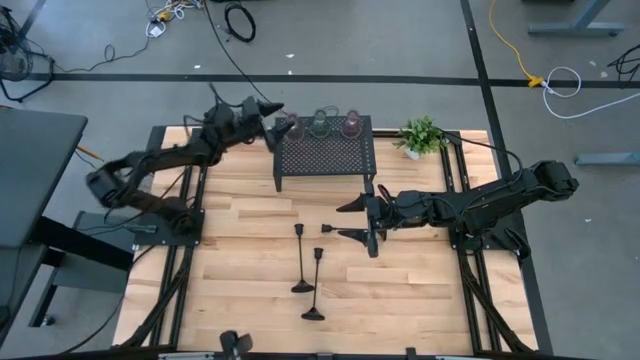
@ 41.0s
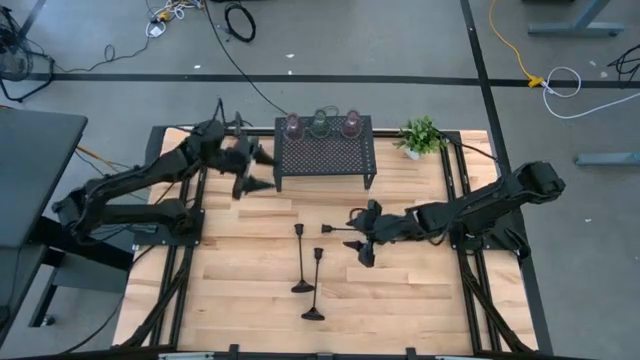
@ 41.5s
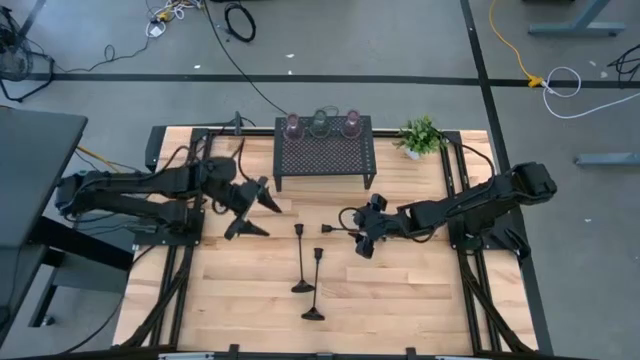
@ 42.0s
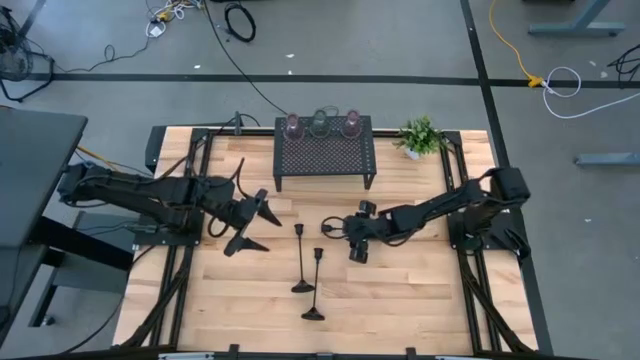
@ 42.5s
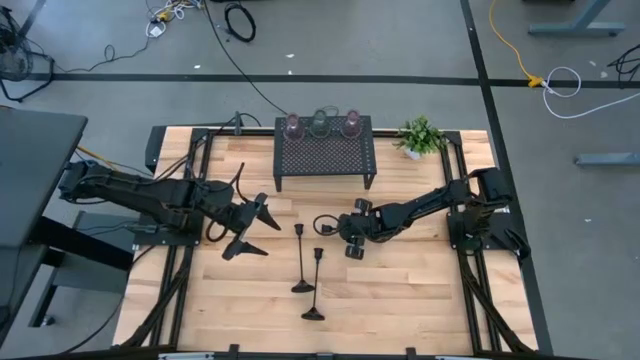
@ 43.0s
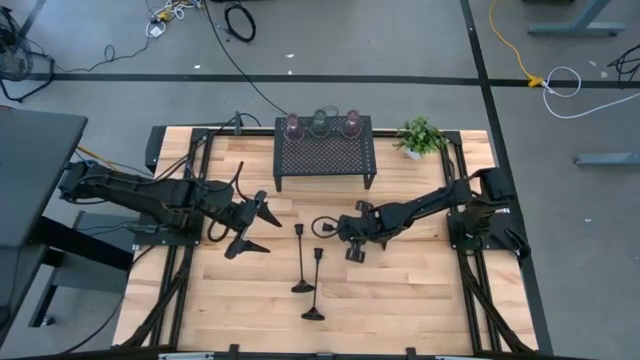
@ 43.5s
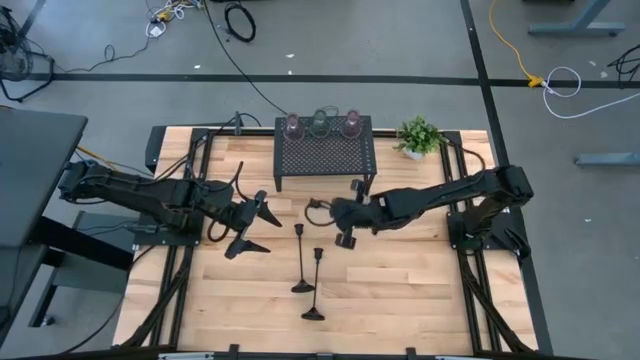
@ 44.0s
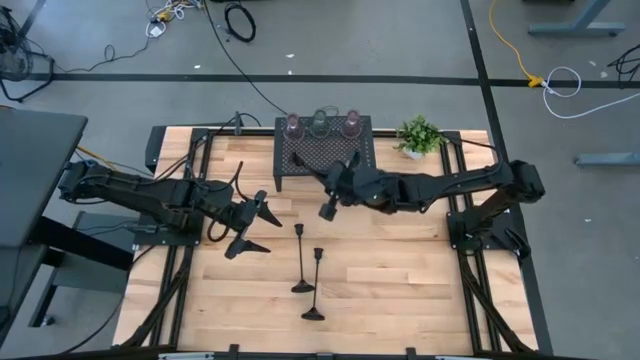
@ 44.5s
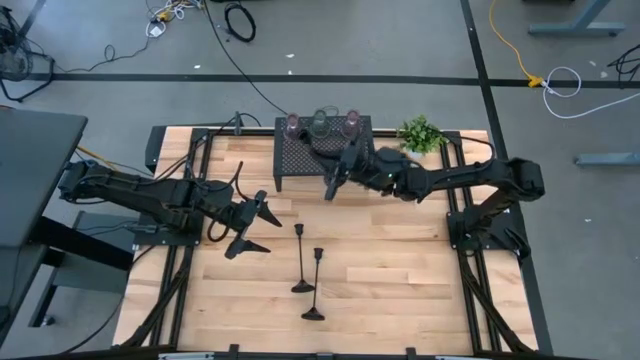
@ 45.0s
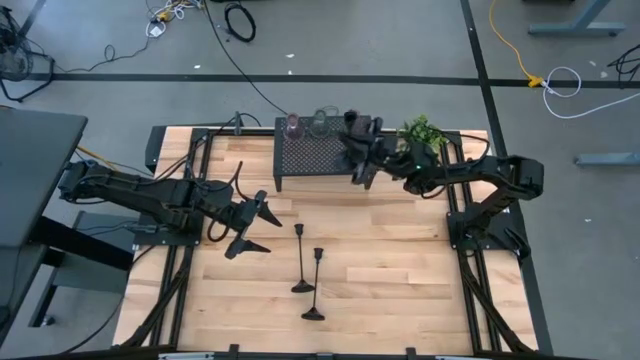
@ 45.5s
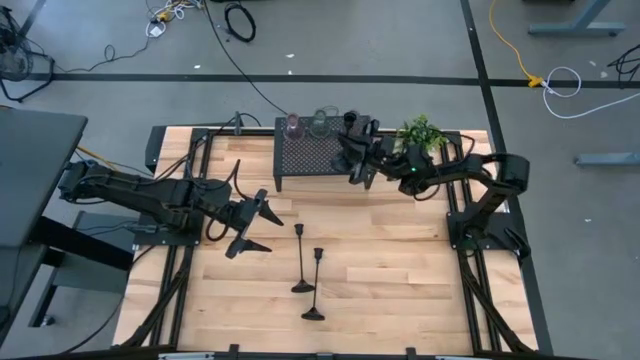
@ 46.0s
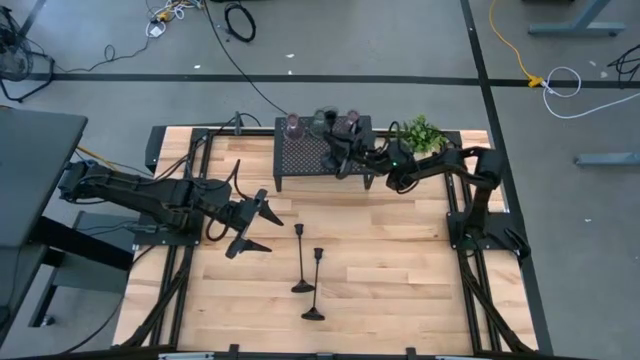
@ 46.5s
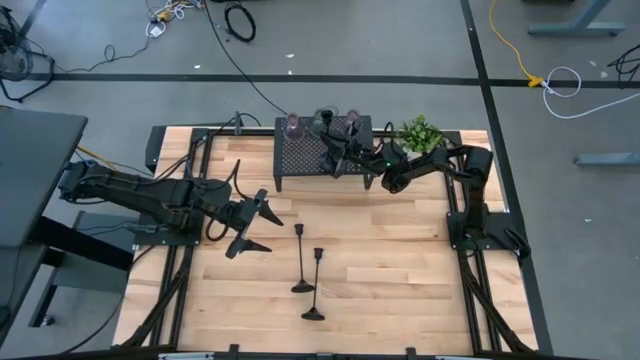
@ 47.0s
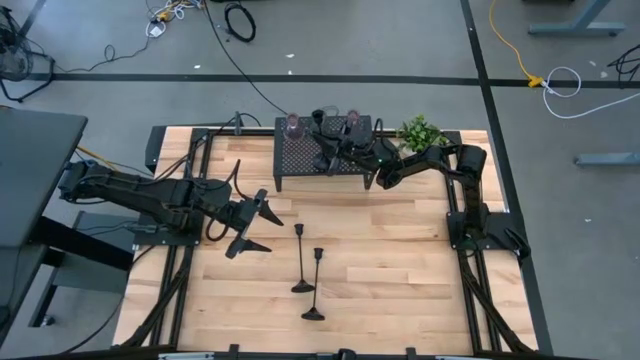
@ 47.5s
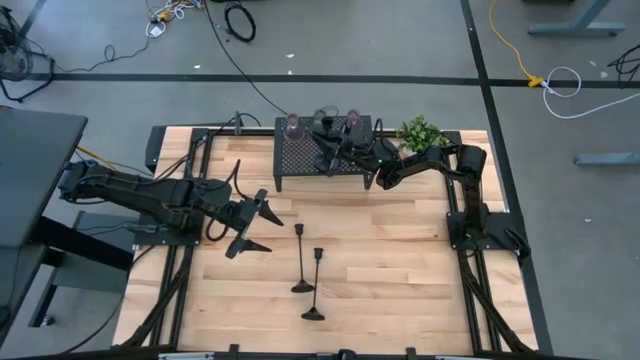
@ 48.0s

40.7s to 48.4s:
Task: Pick & Place candle stick holders
Put the top right black candle holder on the shelf

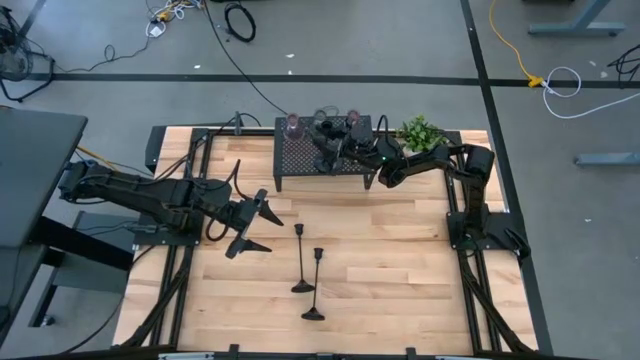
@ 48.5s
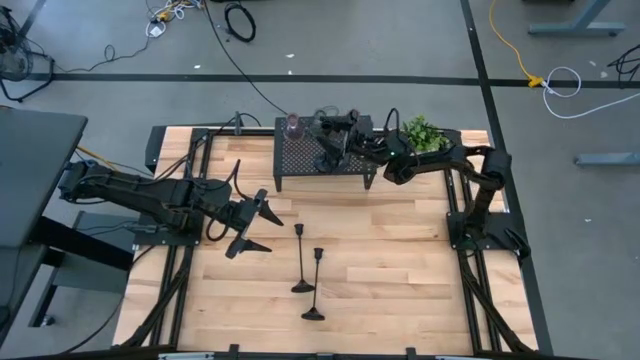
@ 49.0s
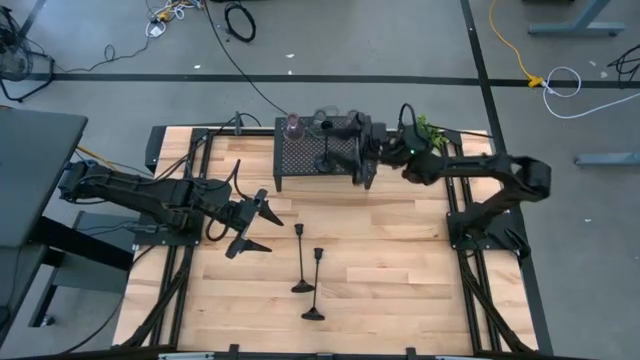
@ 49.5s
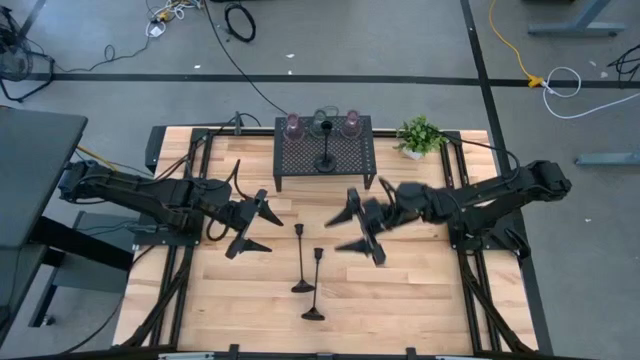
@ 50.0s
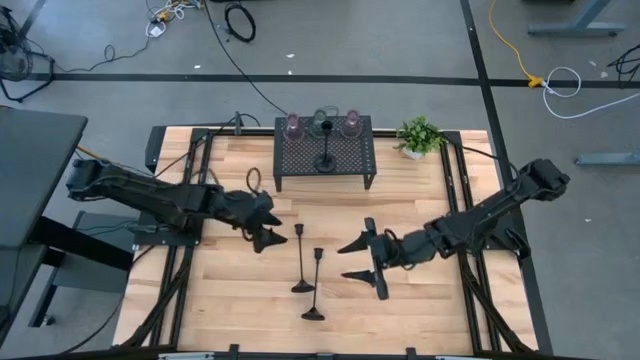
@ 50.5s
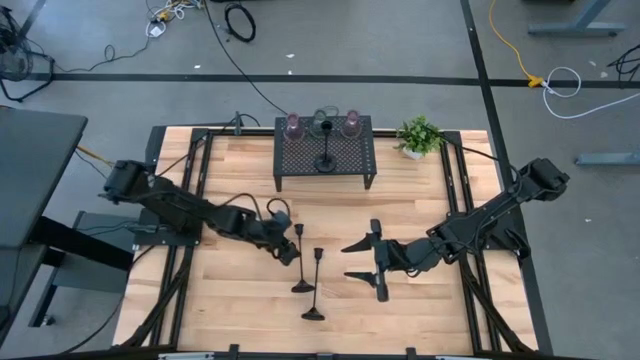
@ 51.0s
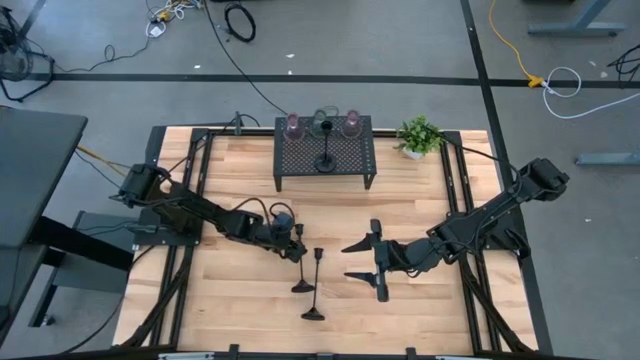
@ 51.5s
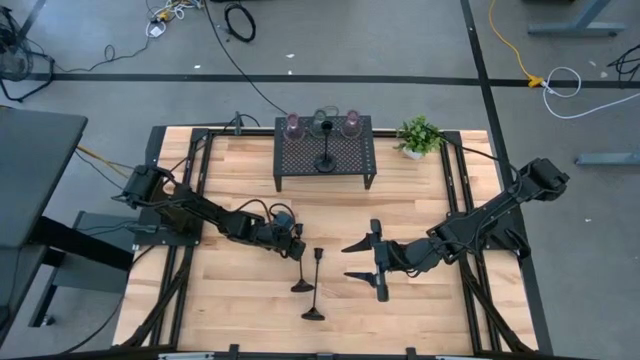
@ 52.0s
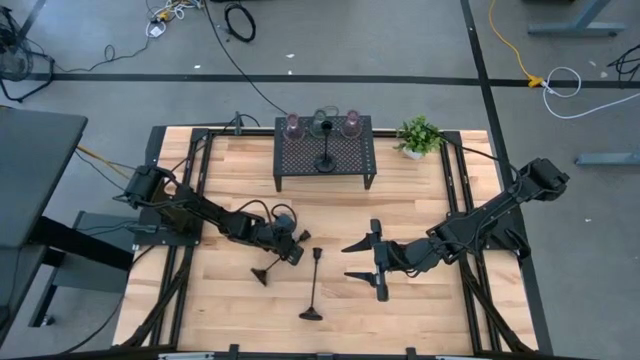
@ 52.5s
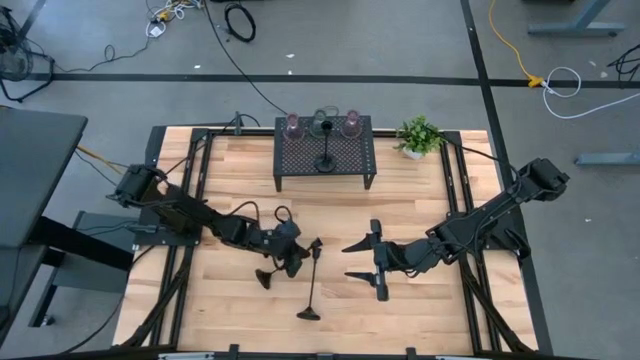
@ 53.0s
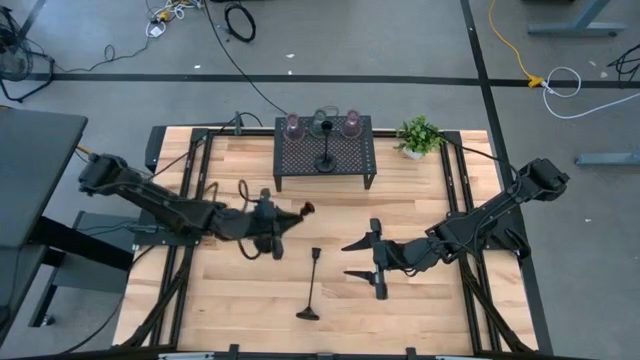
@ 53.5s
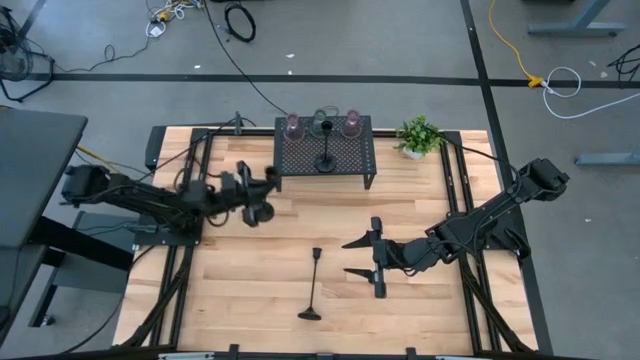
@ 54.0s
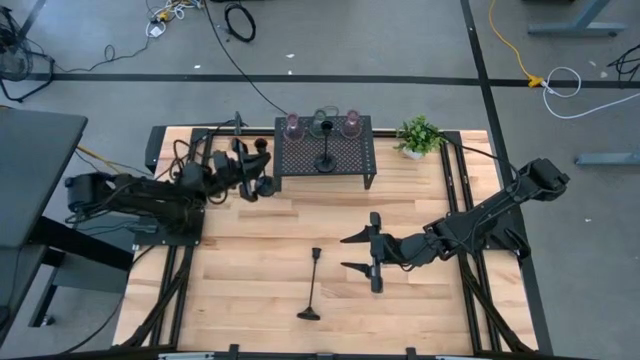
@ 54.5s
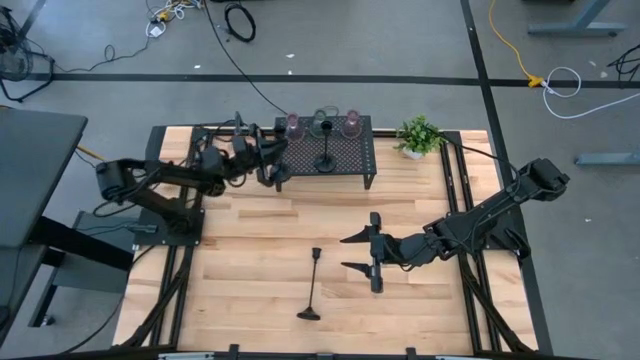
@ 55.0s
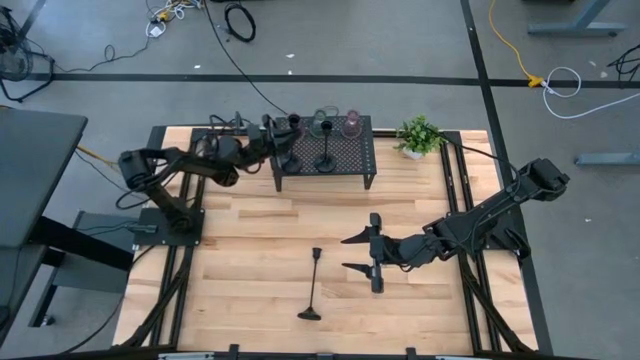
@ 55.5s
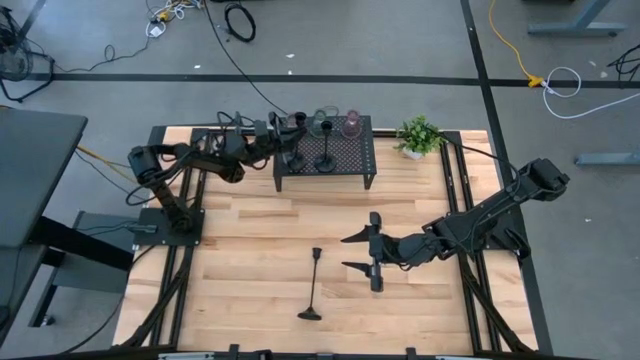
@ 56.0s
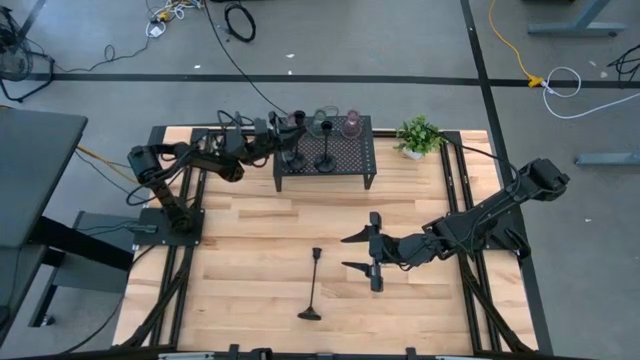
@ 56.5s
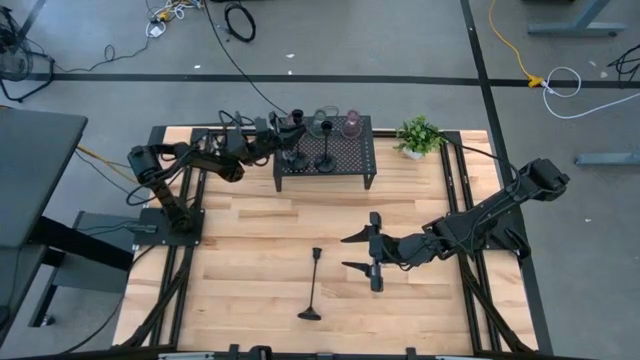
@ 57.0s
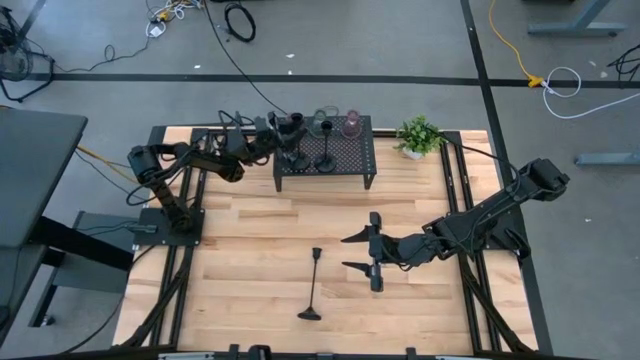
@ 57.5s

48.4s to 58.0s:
Put the left black candle holder on the shelf

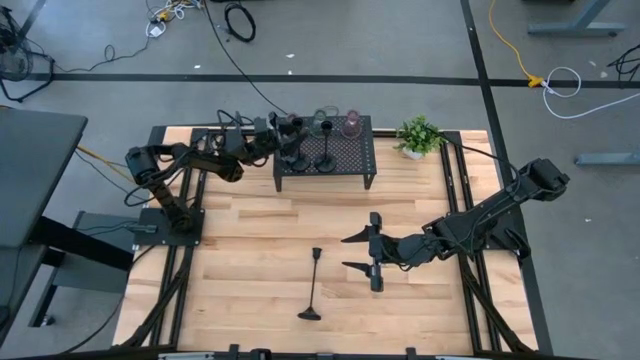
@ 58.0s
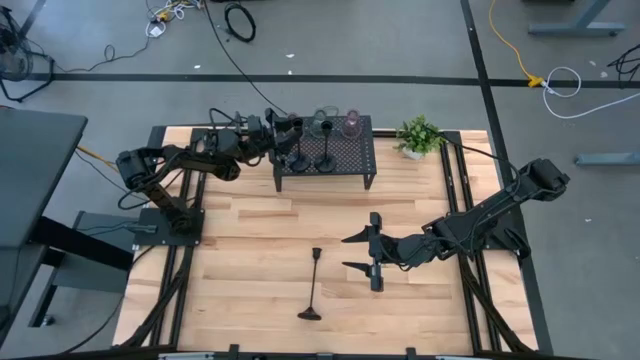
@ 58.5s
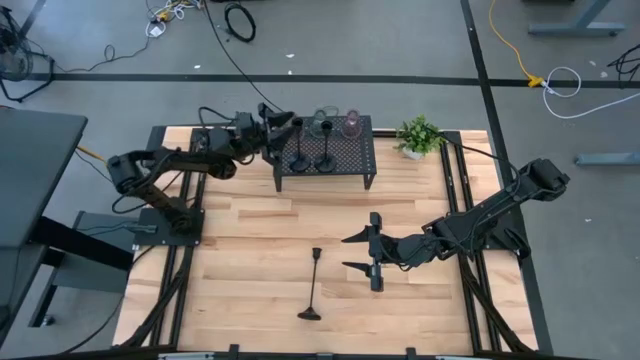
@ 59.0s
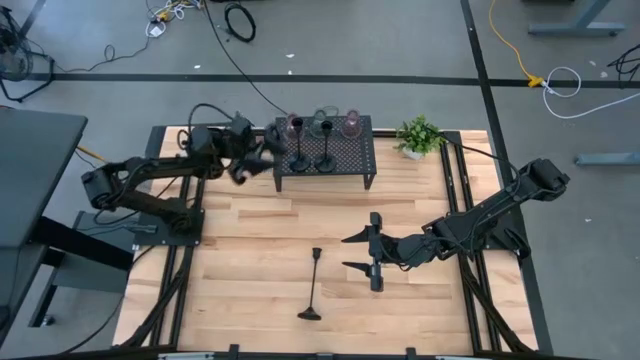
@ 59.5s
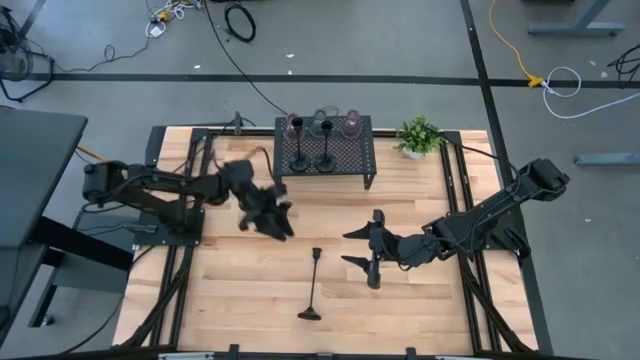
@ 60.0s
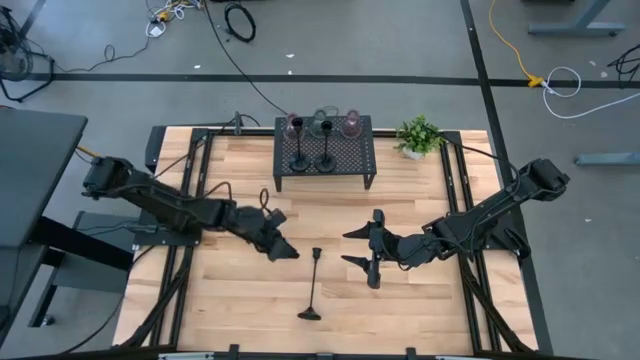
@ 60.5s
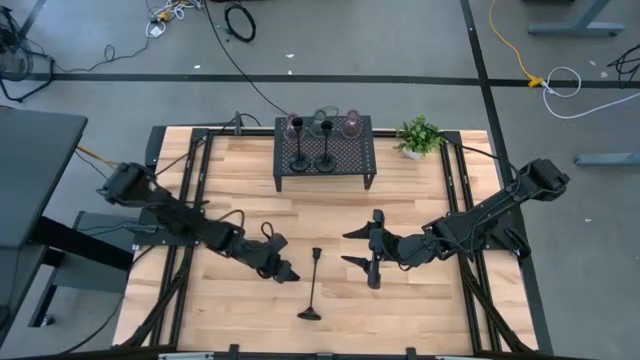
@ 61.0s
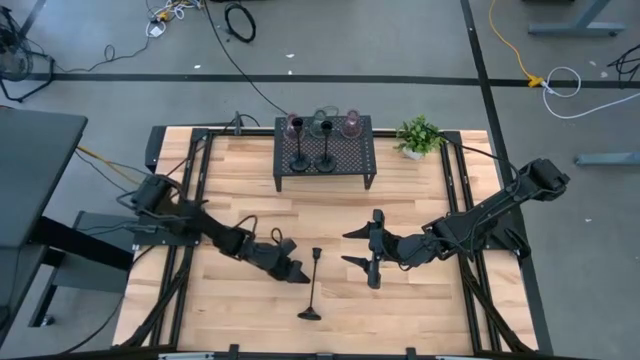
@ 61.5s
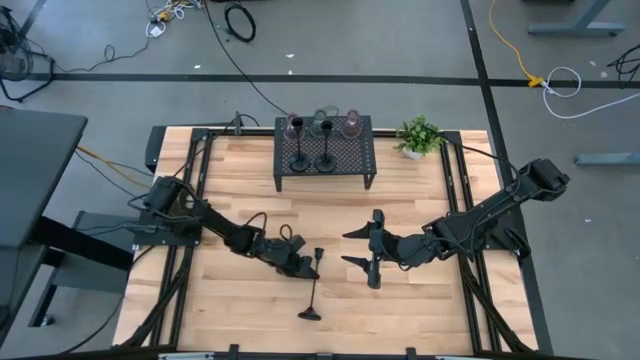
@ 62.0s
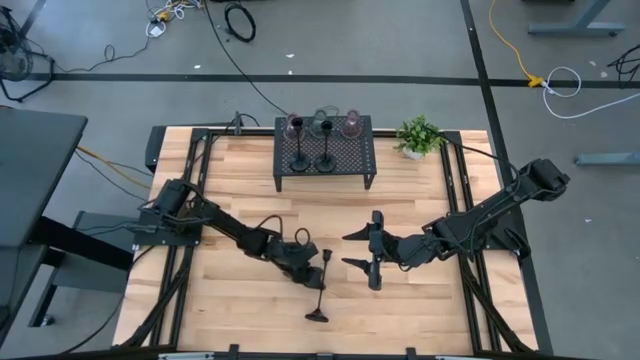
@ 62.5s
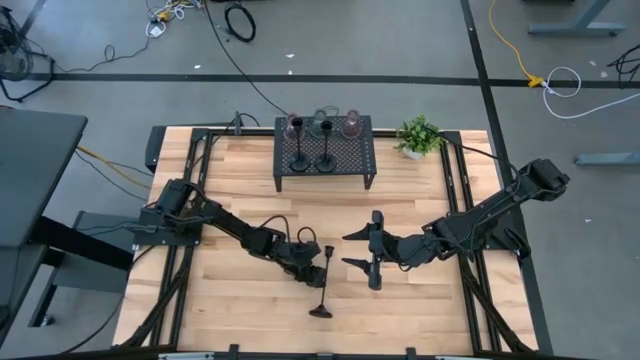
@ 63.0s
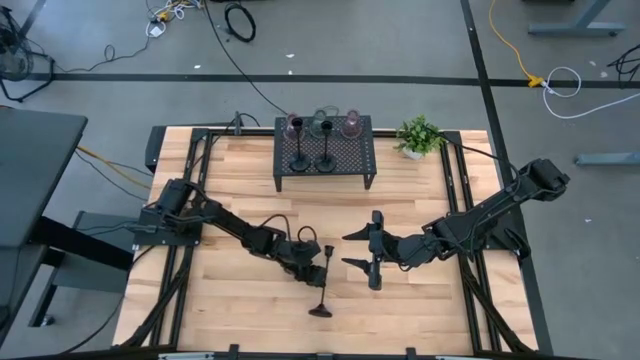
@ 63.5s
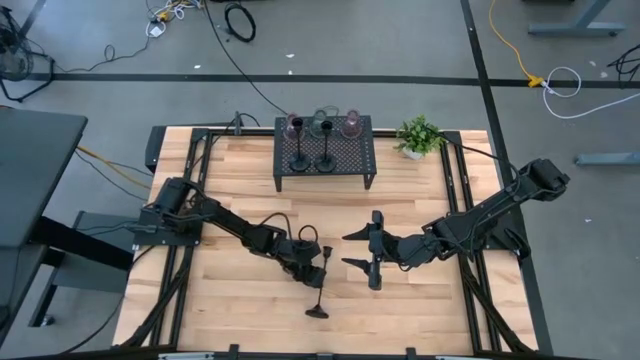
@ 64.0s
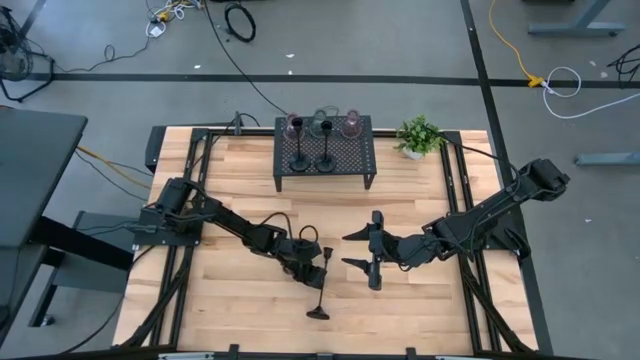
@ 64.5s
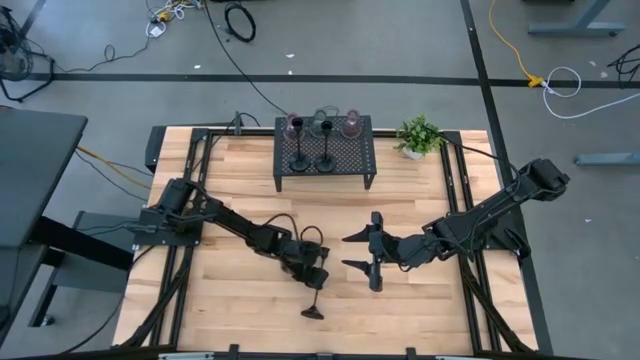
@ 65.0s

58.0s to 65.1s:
Put the black candle holder on the shelf
